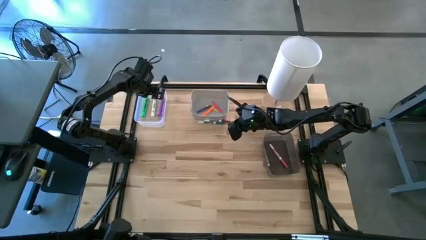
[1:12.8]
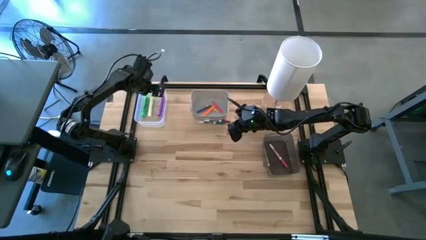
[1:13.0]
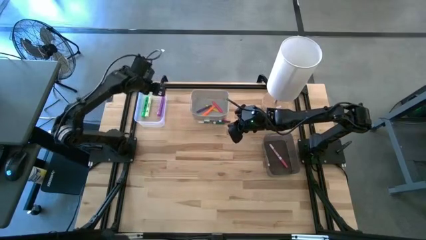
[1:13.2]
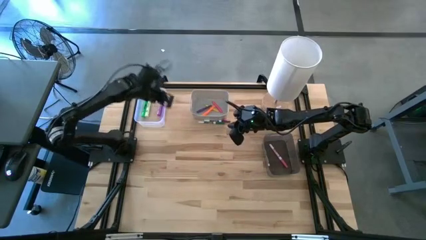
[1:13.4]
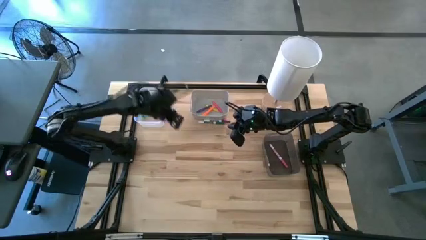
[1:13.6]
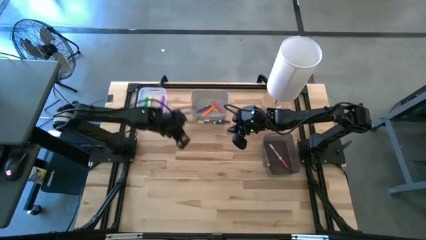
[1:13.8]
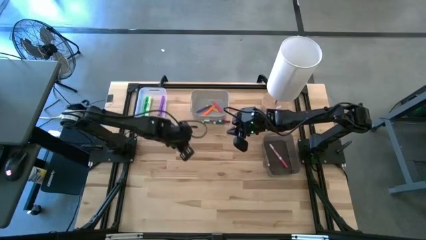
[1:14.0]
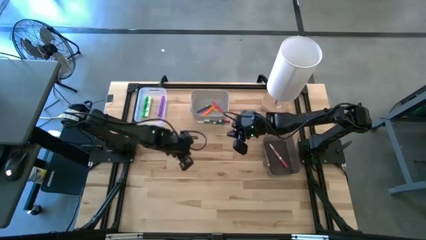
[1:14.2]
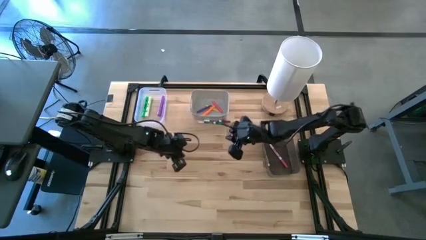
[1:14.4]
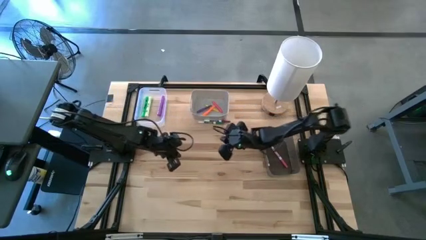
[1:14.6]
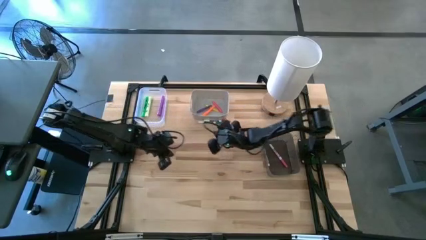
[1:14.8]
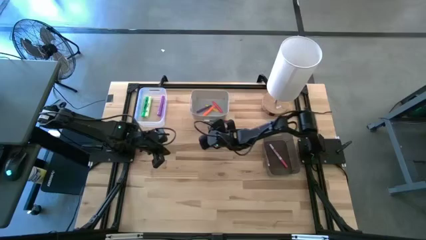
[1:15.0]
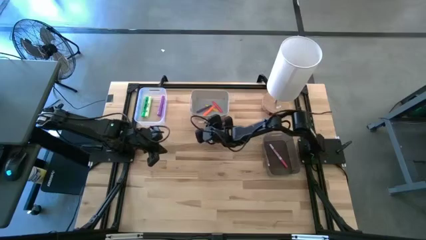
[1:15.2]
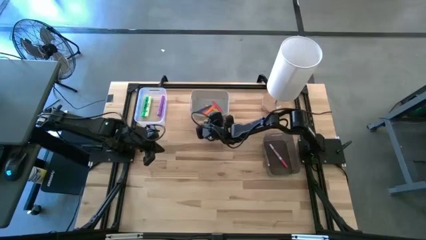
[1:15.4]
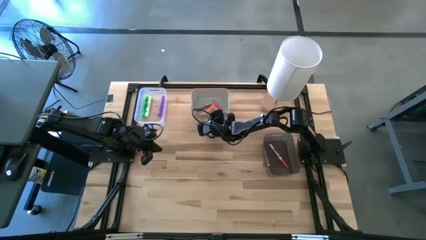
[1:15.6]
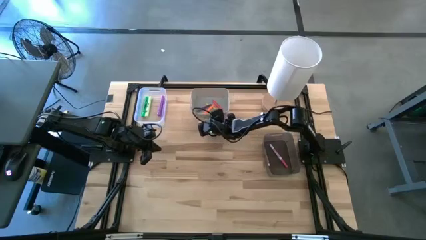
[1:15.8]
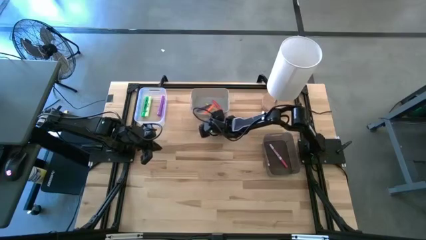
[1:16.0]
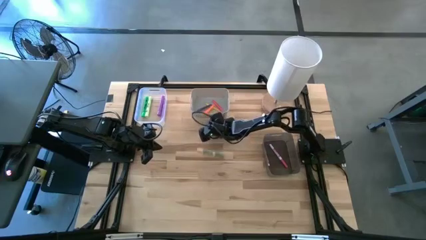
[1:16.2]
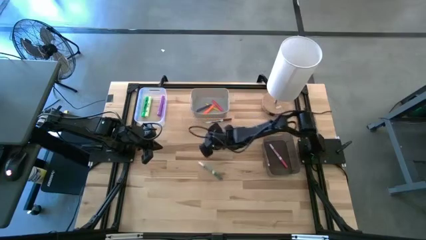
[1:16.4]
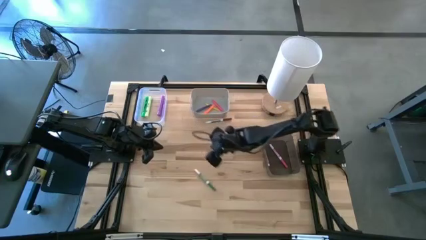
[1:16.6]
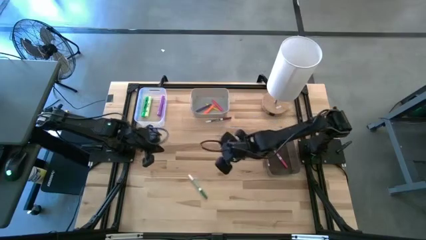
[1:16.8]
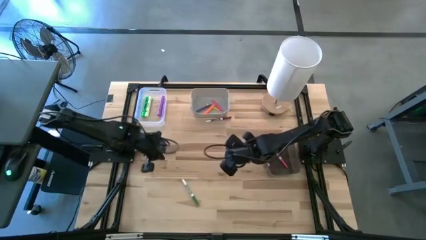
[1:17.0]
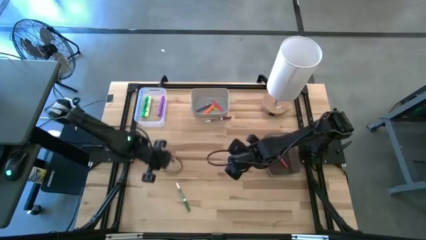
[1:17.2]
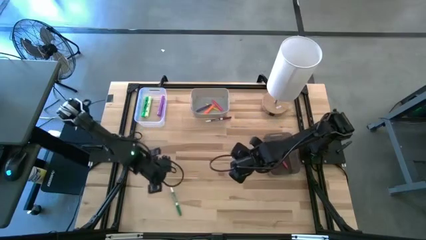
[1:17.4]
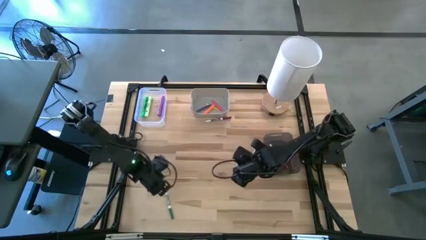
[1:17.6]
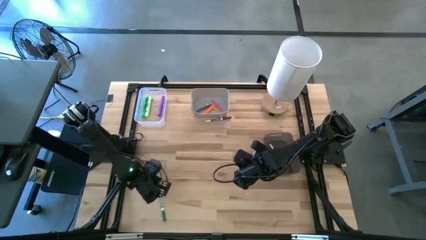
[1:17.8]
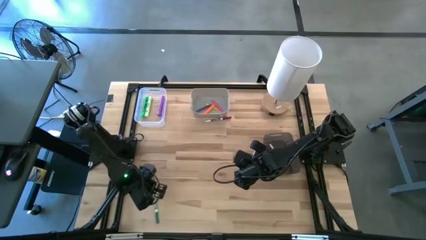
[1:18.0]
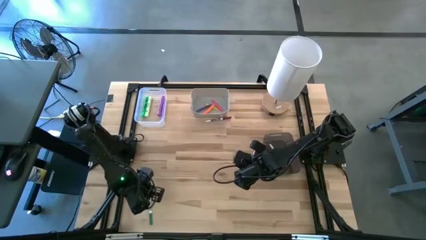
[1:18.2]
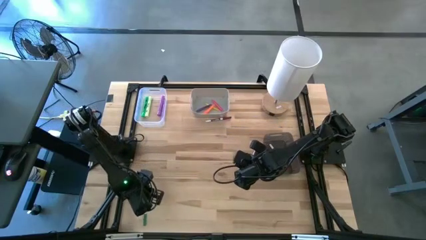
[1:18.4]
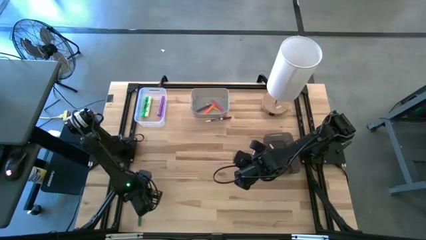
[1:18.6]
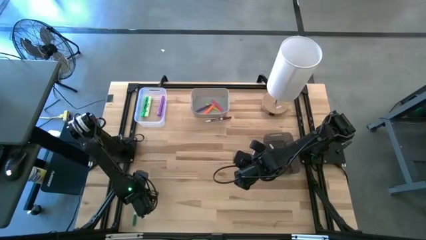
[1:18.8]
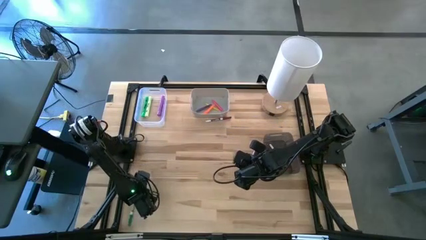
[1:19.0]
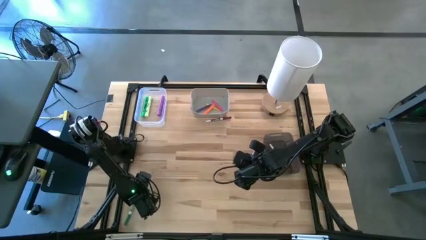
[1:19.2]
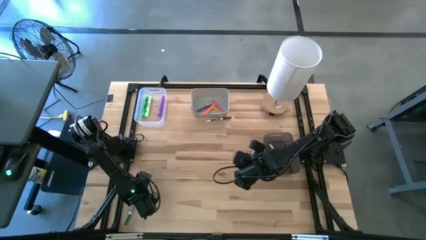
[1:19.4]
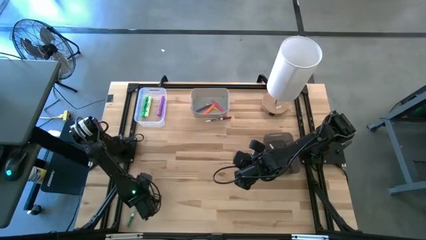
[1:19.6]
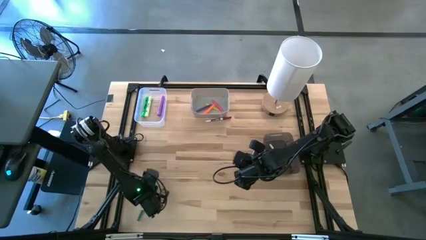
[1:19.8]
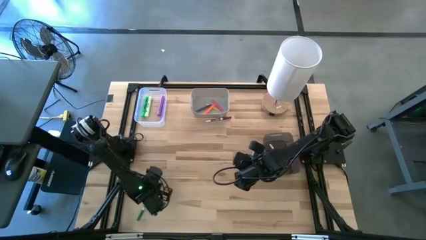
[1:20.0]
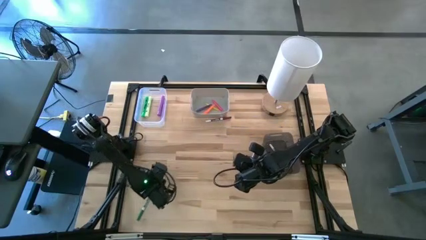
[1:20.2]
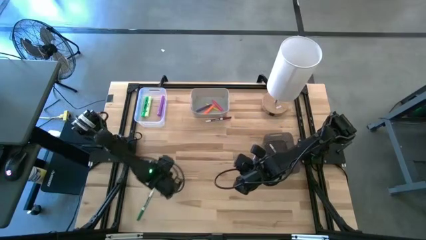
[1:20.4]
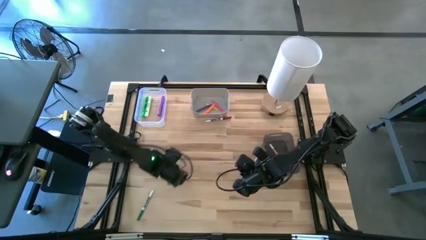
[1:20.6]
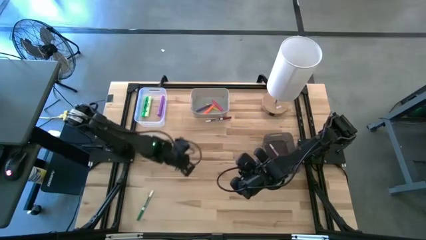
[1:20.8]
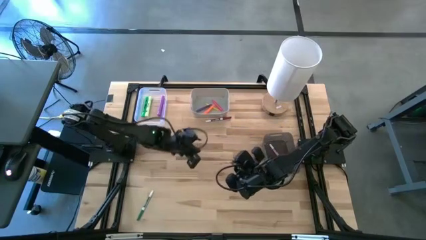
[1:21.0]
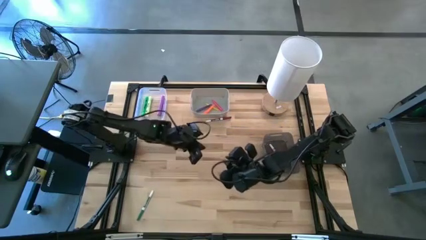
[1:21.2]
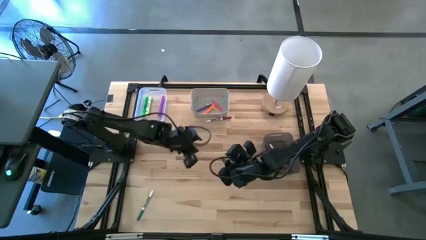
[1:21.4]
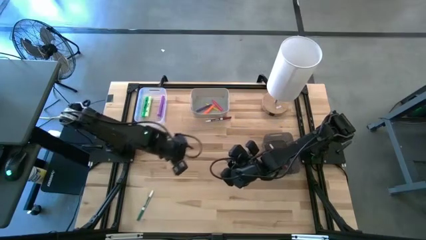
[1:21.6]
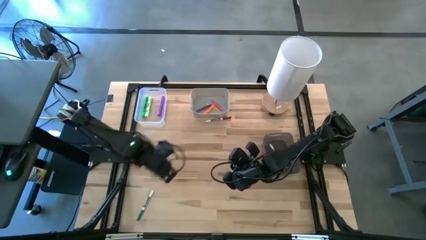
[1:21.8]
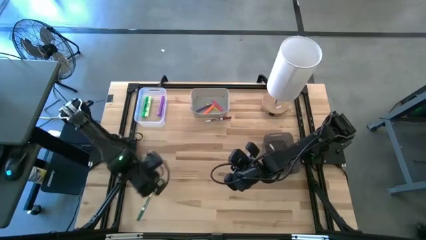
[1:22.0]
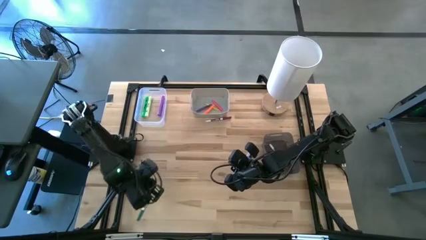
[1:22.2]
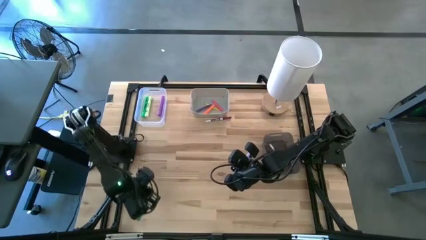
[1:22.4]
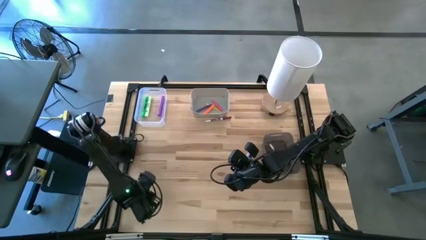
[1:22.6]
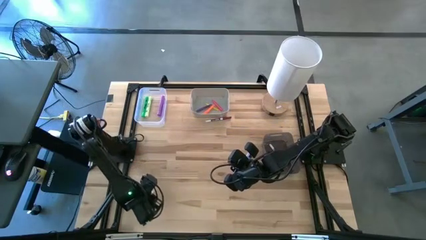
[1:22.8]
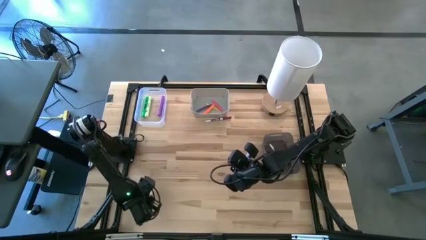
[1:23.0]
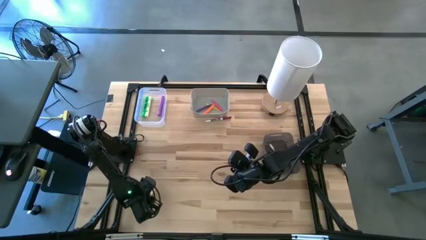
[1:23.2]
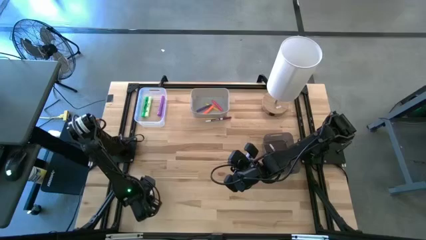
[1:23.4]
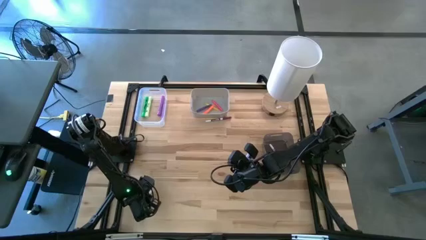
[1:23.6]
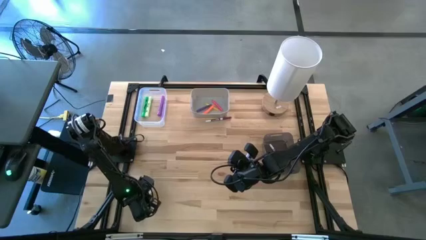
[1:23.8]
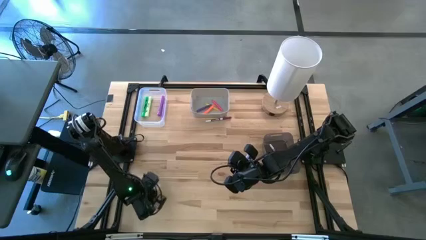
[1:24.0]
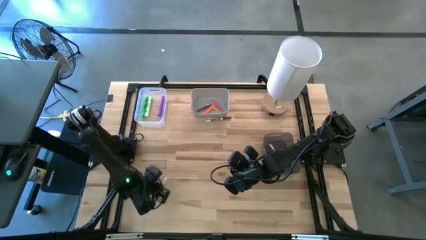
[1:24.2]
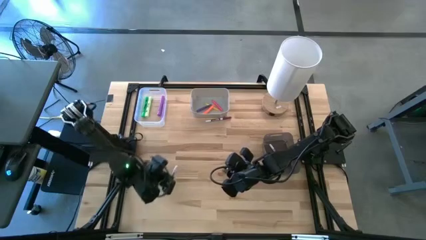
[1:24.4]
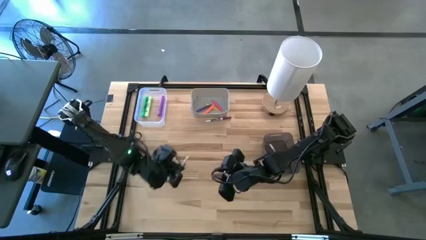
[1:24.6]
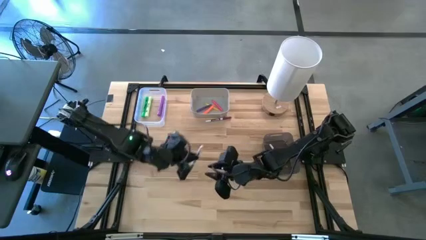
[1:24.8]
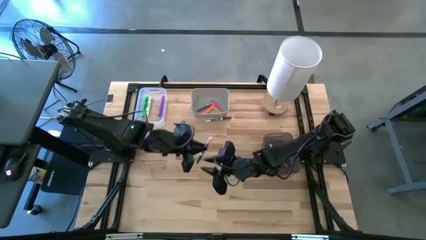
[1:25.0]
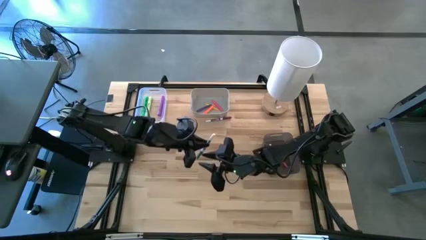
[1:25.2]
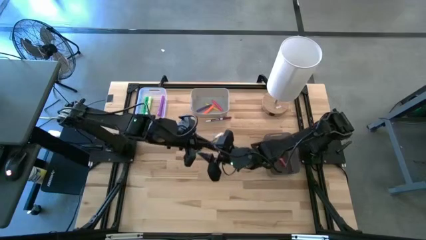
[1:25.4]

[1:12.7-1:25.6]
Task: Pick & Place Markers
Put the green marker into the black bin
